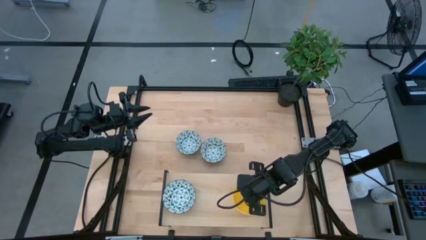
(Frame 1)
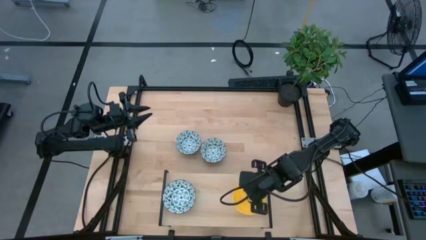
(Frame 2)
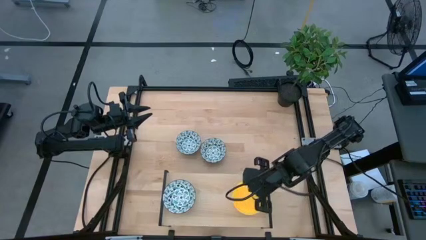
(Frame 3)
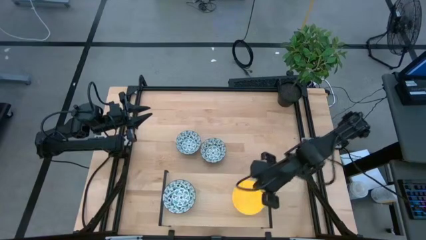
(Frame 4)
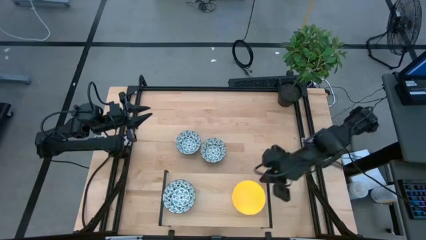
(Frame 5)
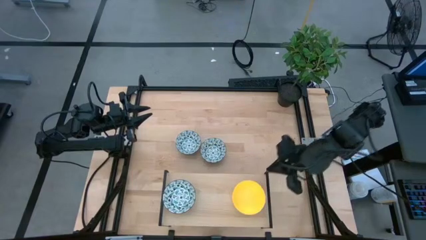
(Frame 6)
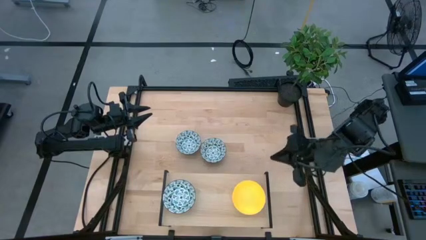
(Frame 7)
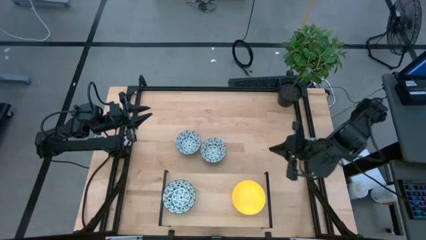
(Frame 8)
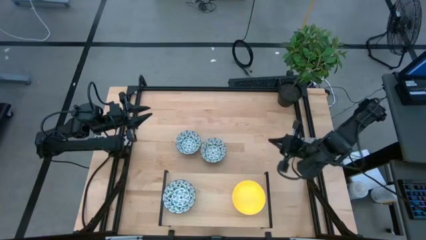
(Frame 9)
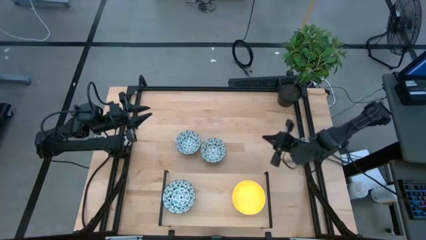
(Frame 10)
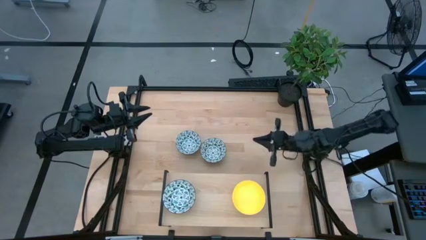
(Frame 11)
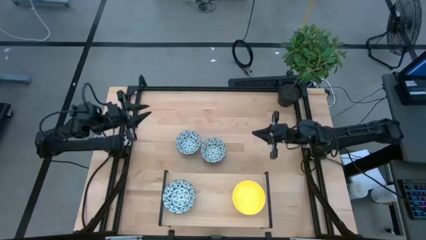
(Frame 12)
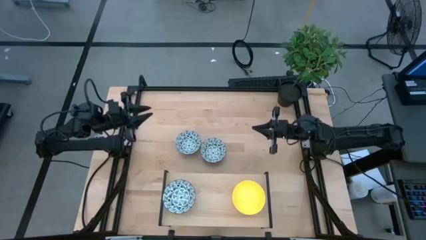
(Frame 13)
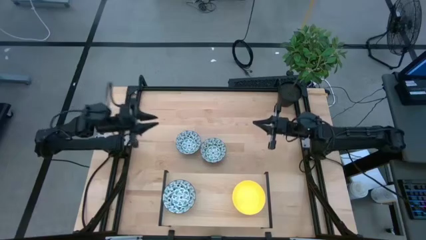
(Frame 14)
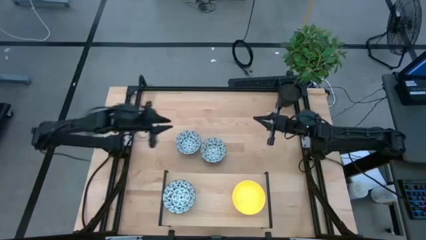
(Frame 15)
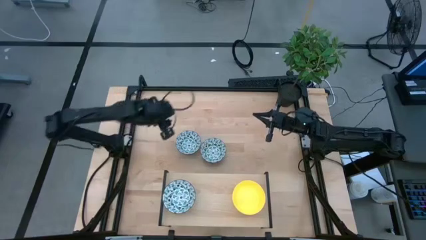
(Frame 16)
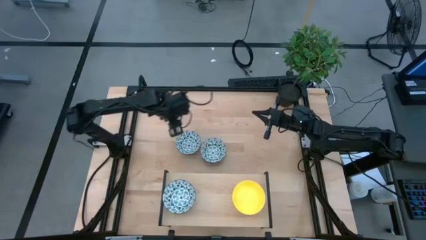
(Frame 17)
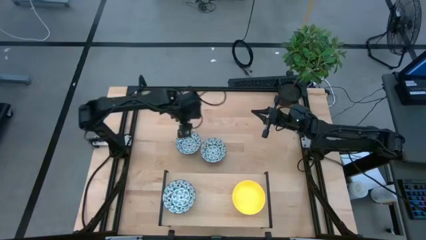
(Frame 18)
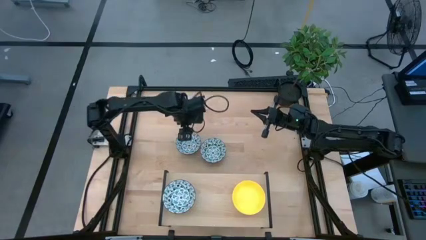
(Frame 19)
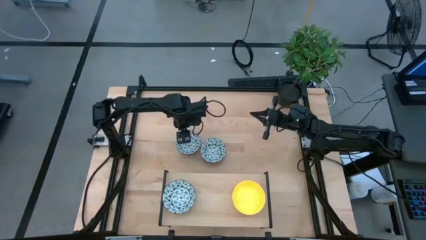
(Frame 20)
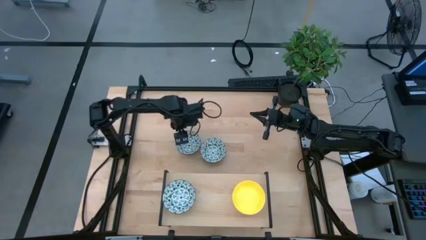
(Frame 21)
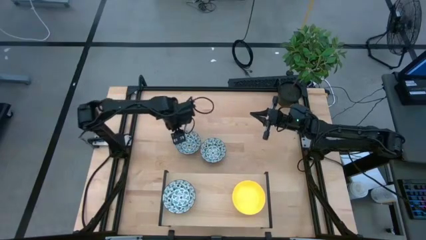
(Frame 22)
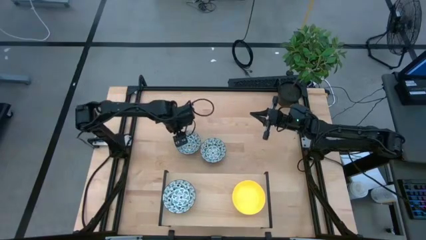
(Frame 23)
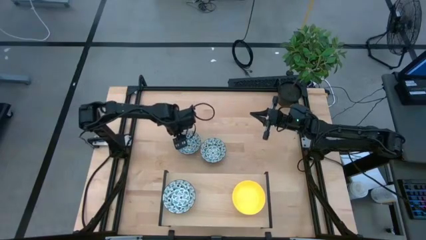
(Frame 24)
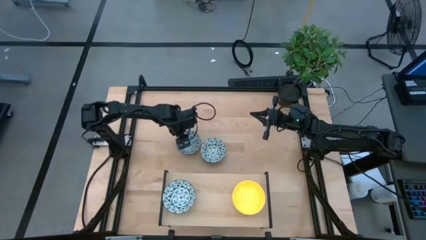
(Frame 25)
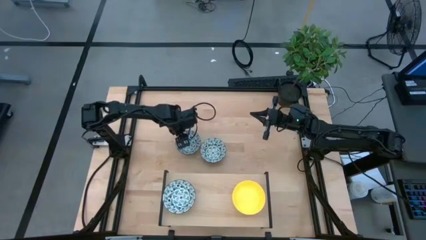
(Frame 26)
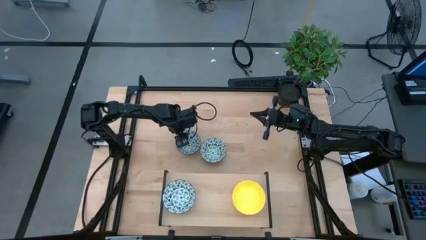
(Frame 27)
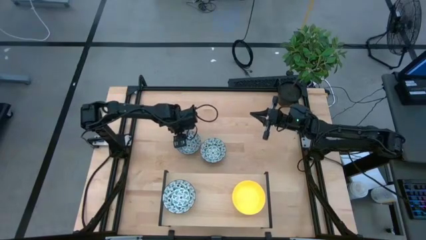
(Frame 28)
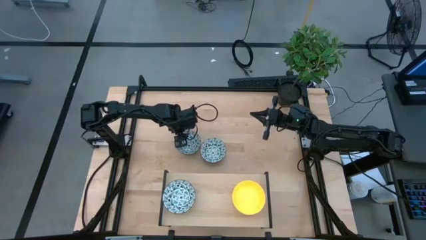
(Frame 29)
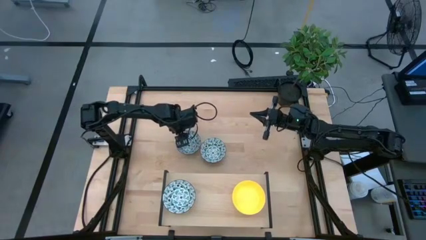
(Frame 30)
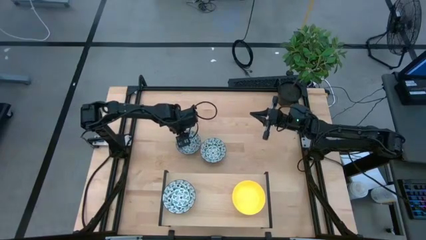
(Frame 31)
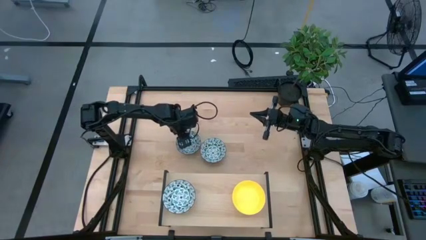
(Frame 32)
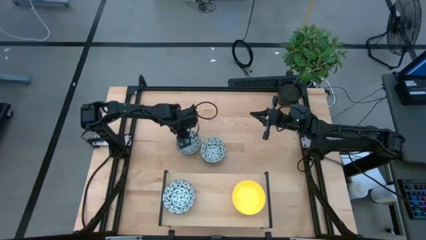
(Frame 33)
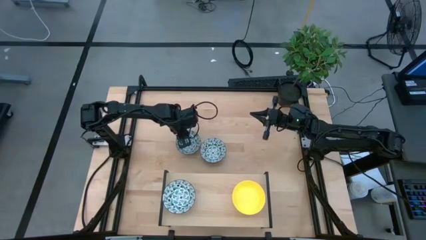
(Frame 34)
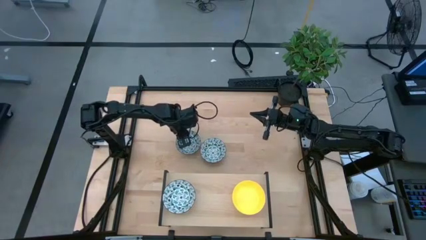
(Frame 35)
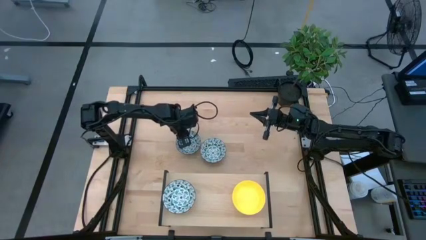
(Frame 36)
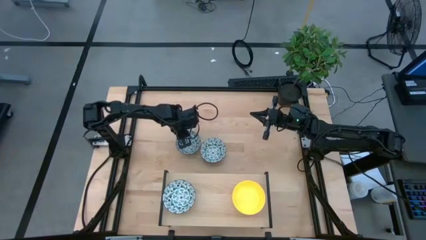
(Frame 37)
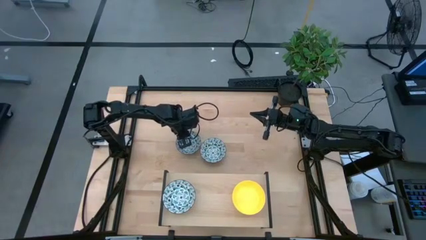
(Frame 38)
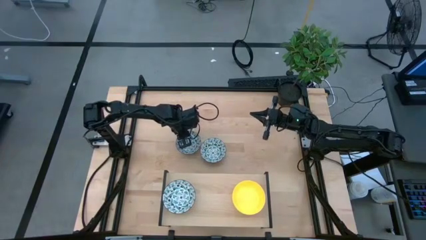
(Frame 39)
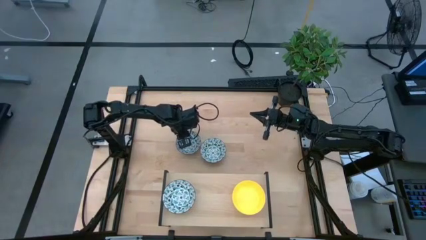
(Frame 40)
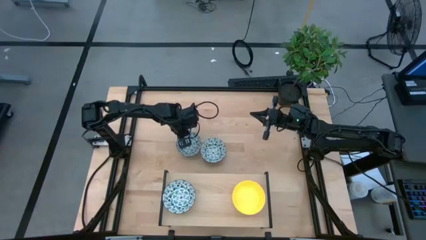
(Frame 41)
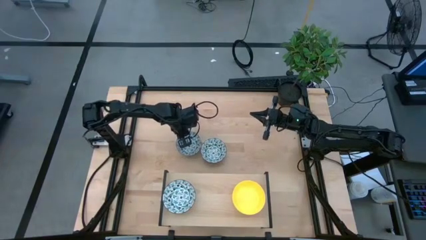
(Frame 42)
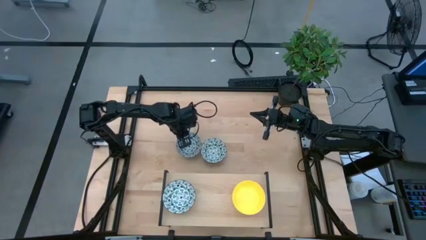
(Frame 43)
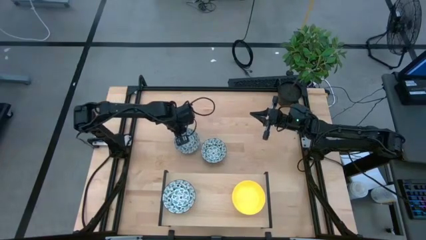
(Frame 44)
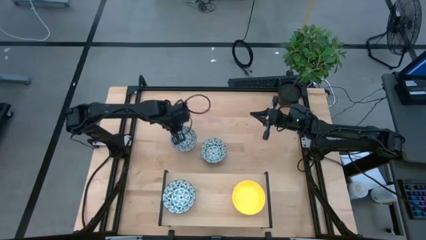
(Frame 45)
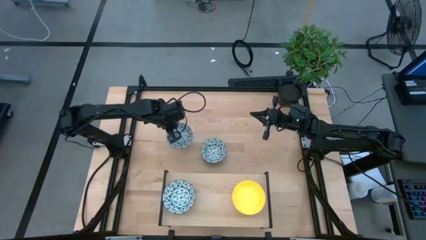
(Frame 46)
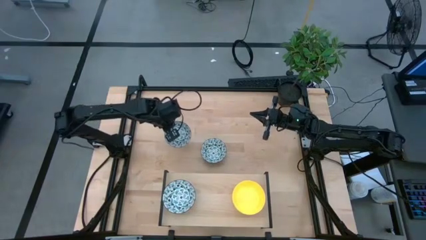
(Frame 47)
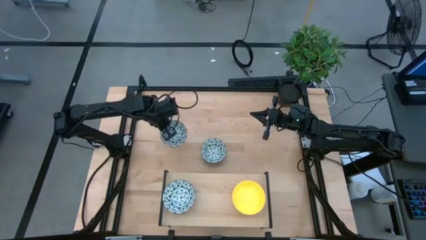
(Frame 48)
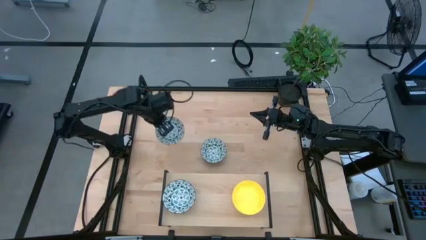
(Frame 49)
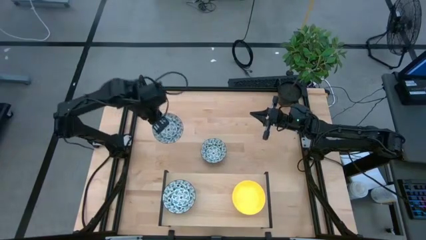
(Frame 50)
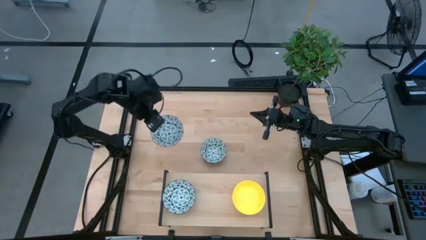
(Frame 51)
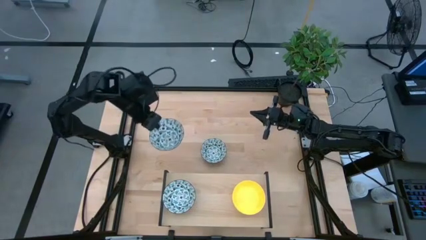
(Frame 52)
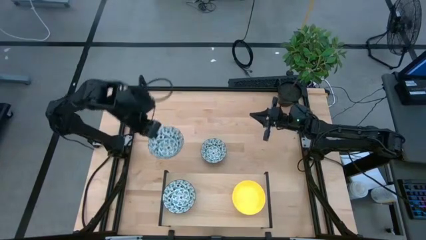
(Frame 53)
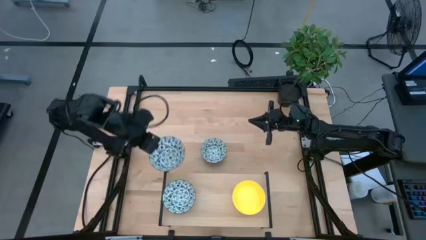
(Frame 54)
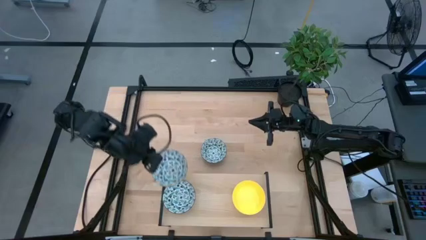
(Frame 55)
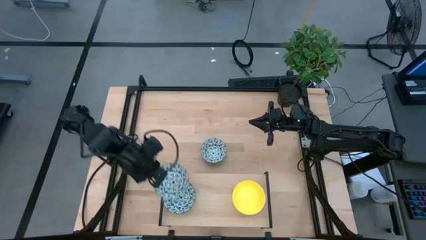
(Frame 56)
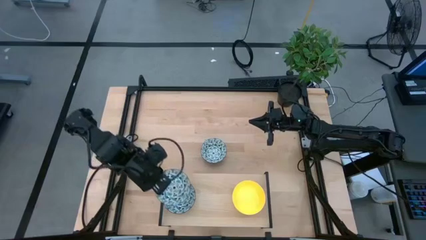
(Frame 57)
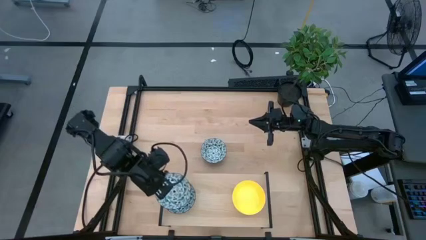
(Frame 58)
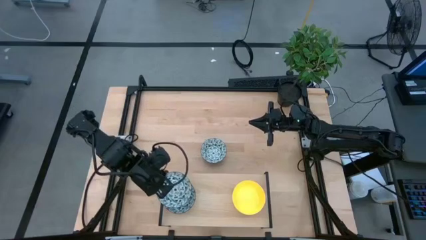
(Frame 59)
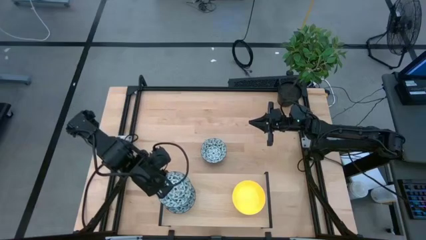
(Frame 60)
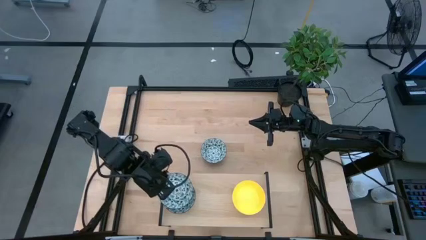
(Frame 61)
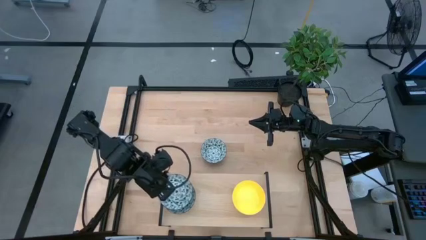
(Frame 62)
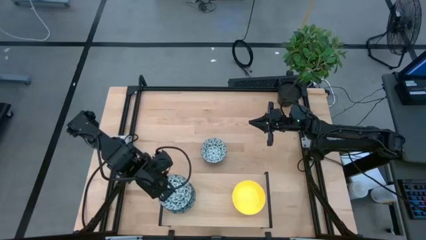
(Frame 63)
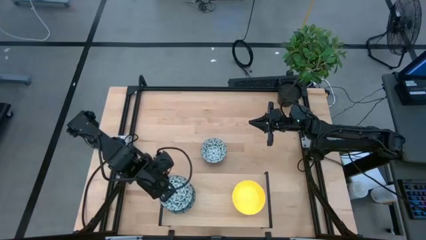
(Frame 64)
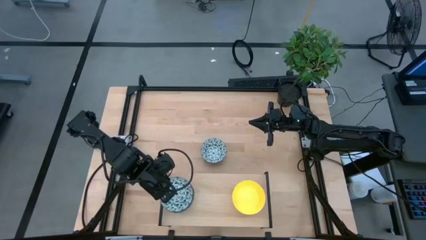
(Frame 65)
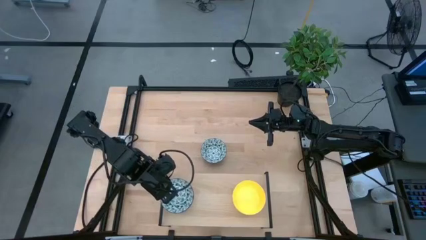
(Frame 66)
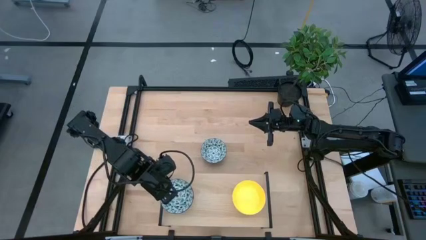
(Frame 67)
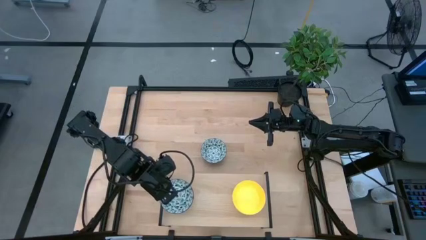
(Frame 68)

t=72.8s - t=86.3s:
Task: Pick & Place Mini bowls
Stack the left white bowl on the white bowl on the shelf
